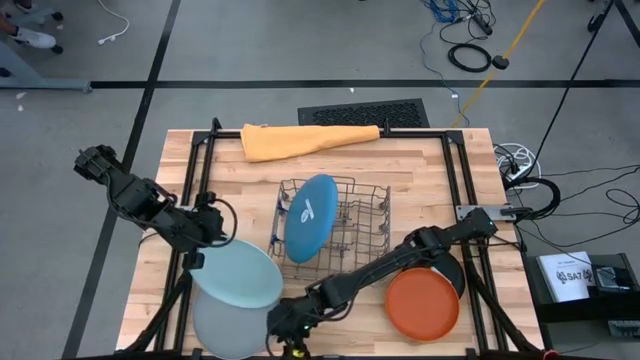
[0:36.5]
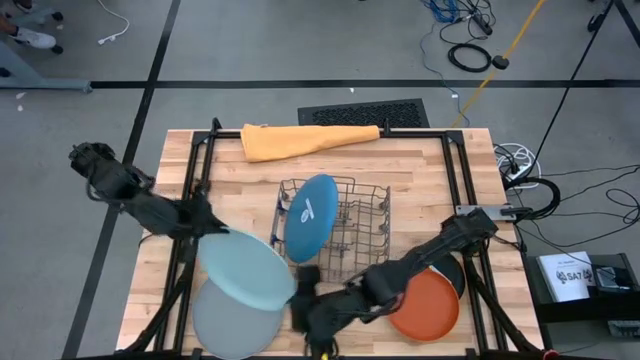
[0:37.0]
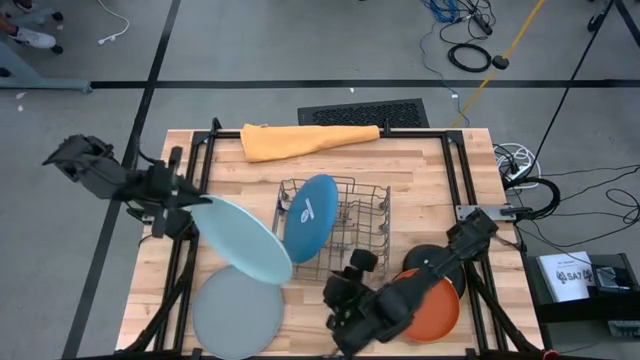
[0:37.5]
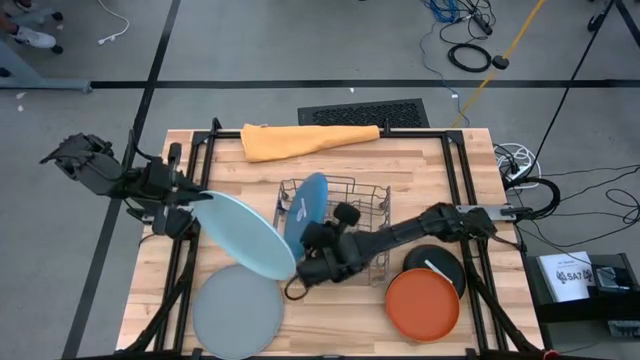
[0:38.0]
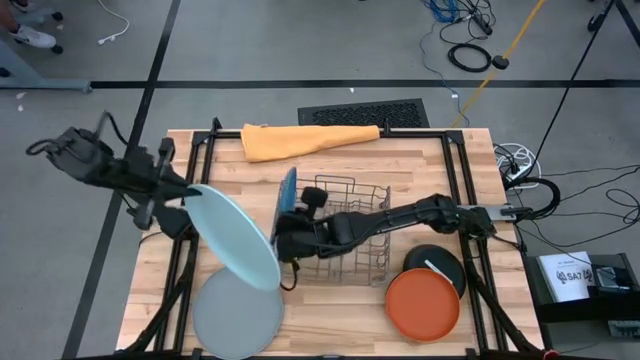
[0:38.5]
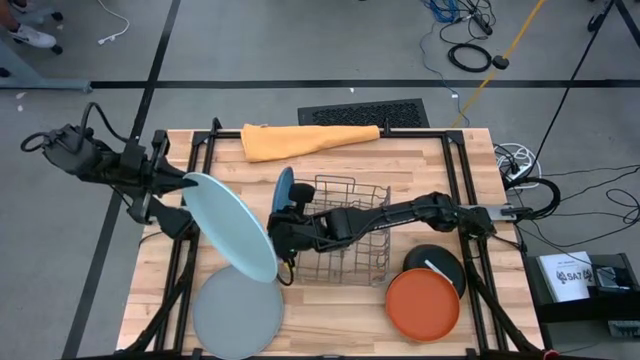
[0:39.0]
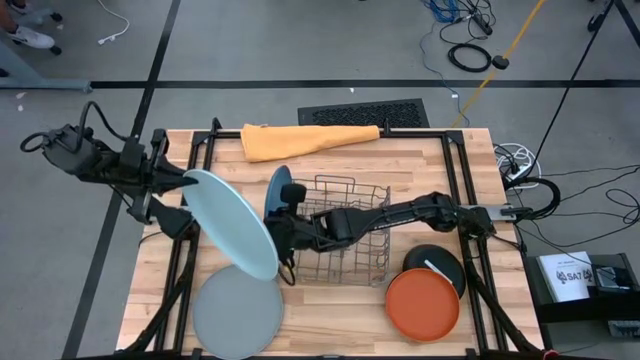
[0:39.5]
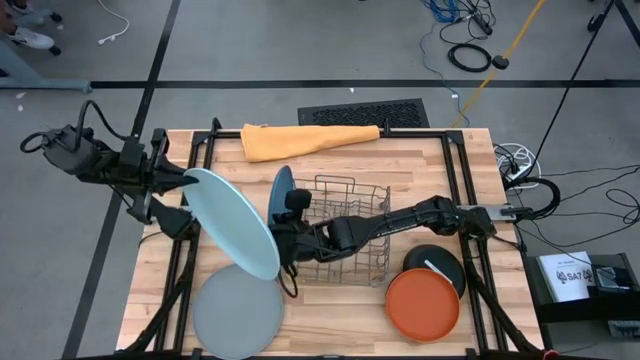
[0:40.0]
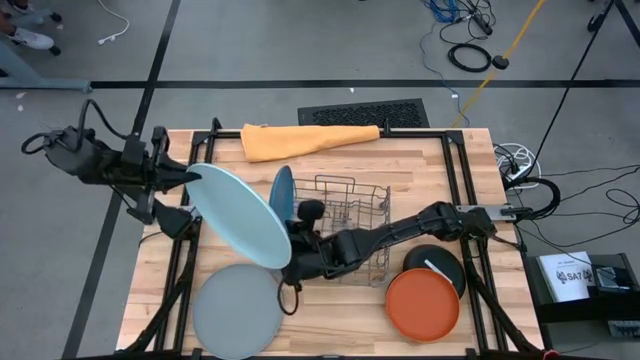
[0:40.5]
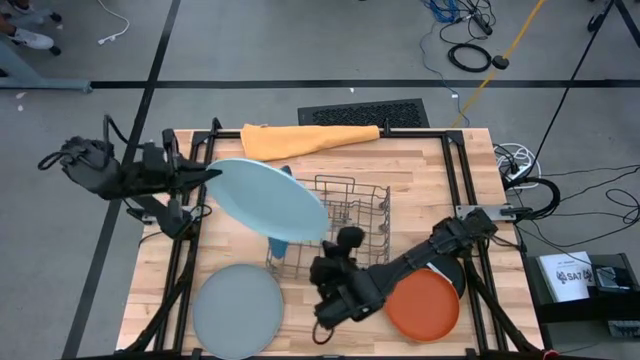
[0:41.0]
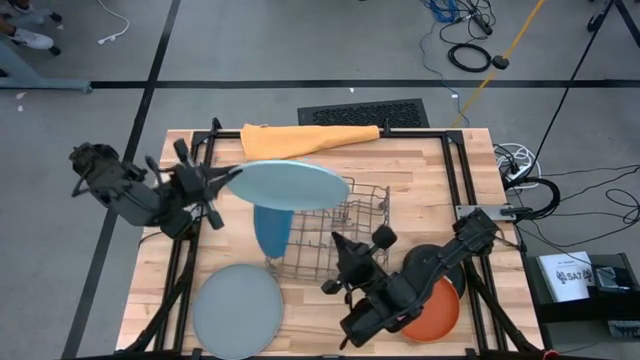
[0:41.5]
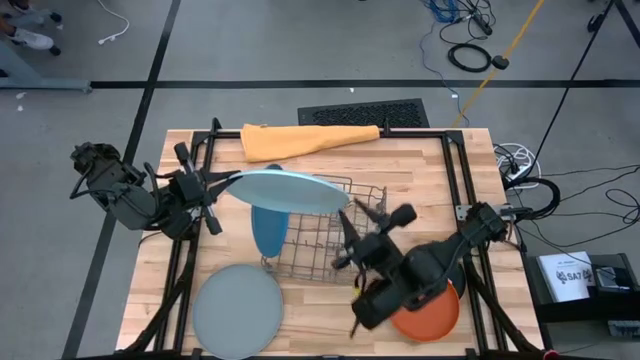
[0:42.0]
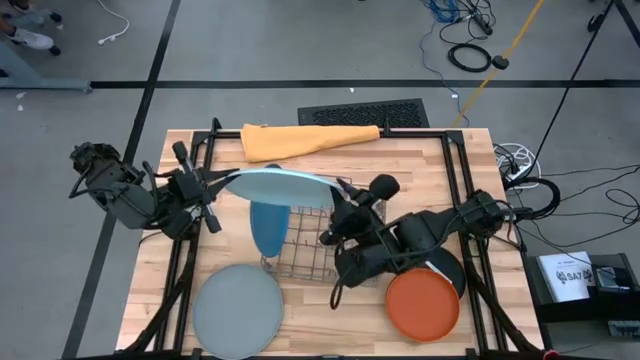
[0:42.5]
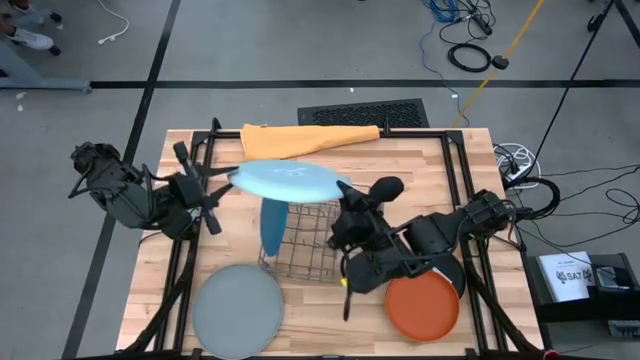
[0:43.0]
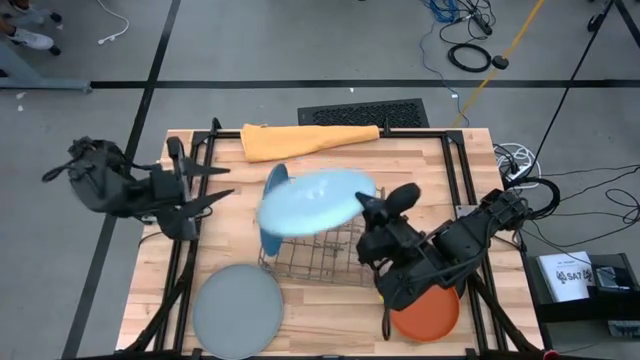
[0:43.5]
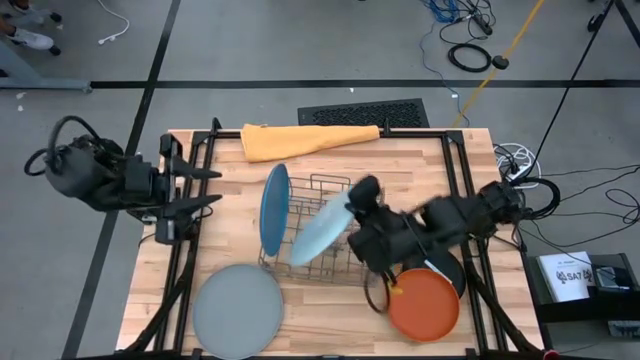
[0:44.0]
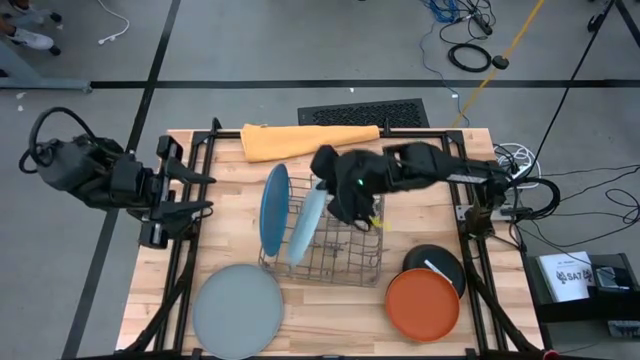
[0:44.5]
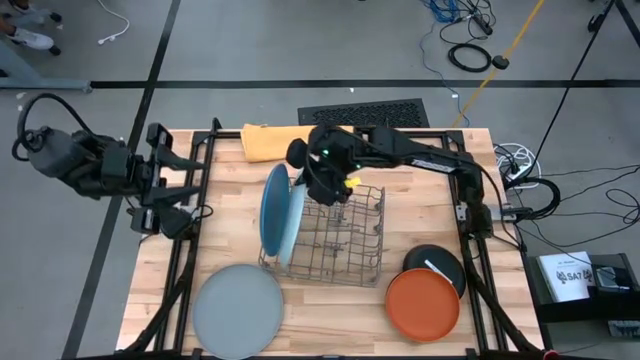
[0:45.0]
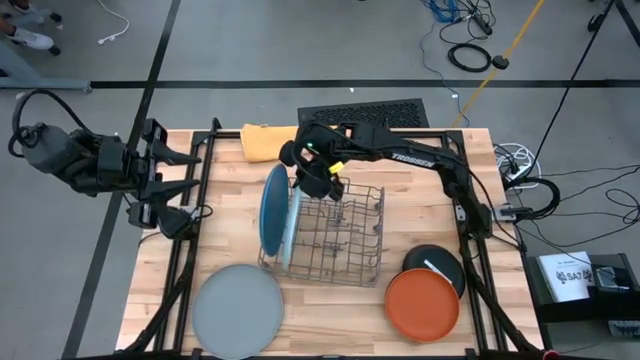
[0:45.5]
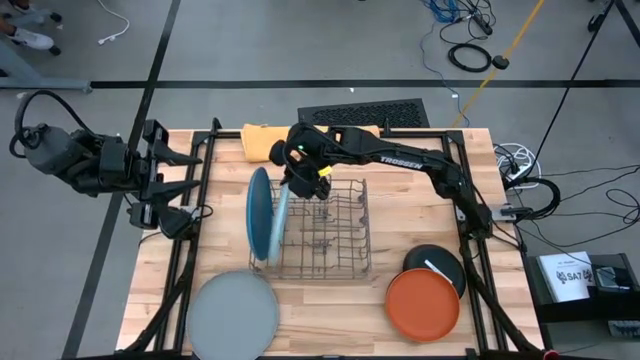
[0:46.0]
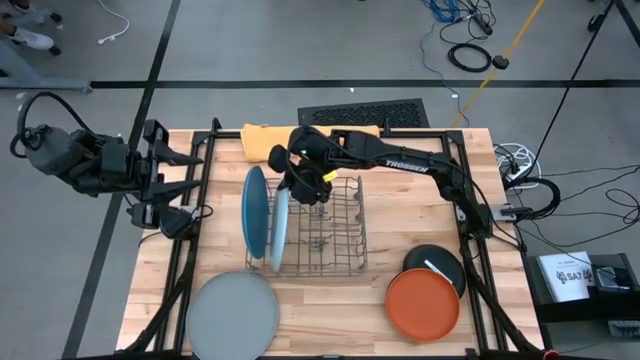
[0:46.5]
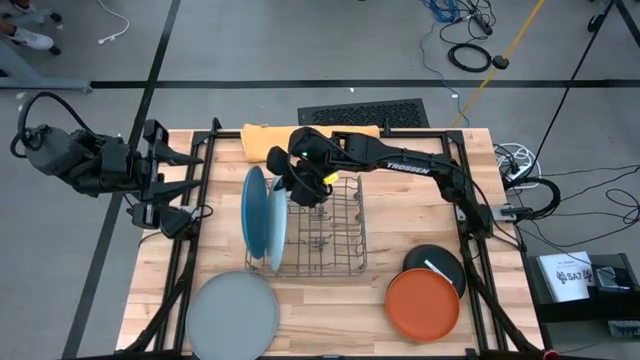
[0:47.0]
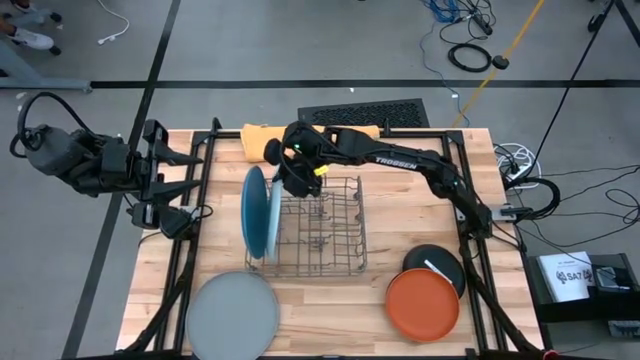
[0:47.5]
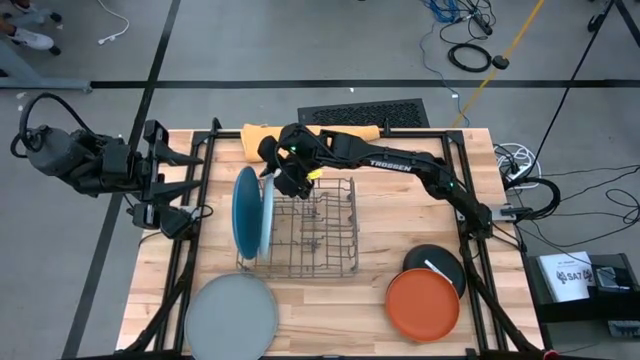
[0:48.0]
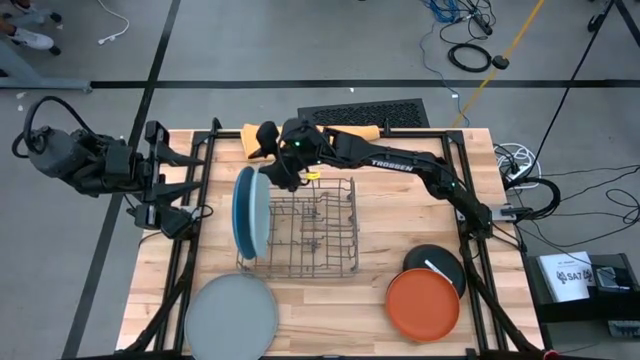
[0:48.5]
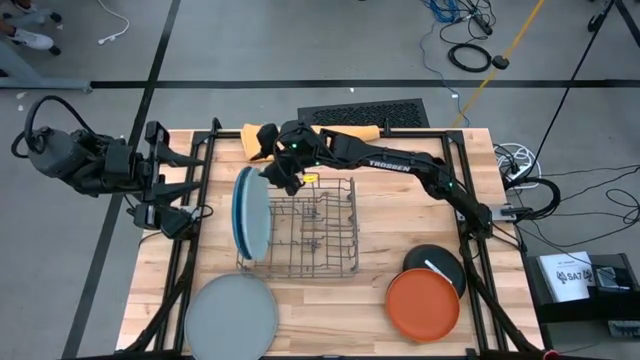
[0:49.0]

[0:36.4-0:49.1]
Task: Sort dishes
Put the light blue plate in the dish rack

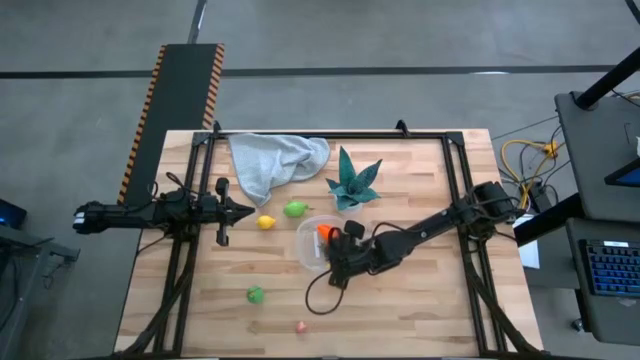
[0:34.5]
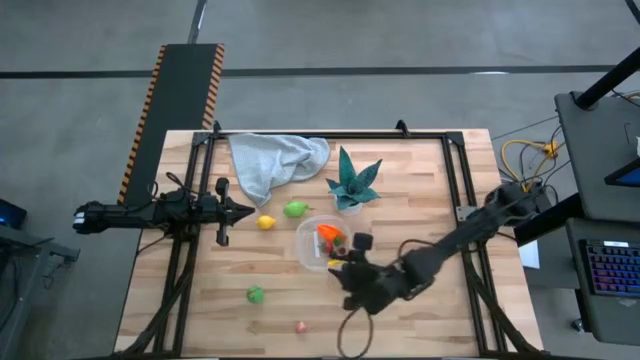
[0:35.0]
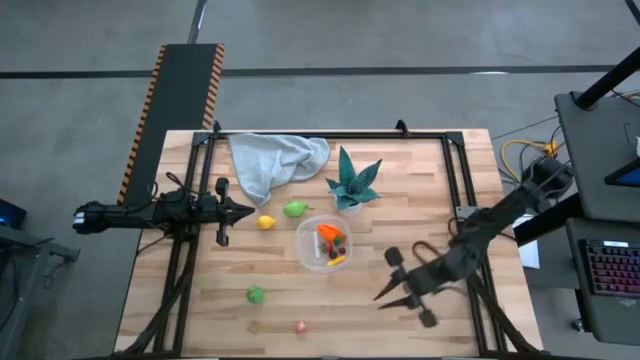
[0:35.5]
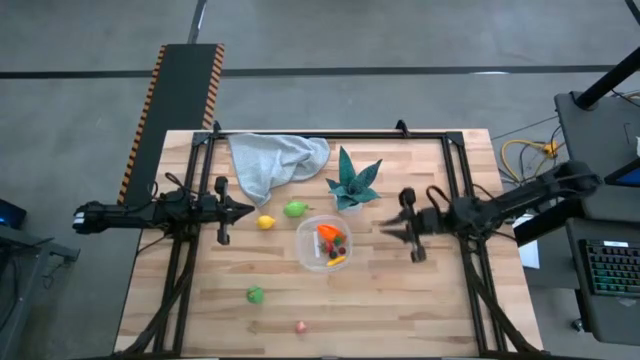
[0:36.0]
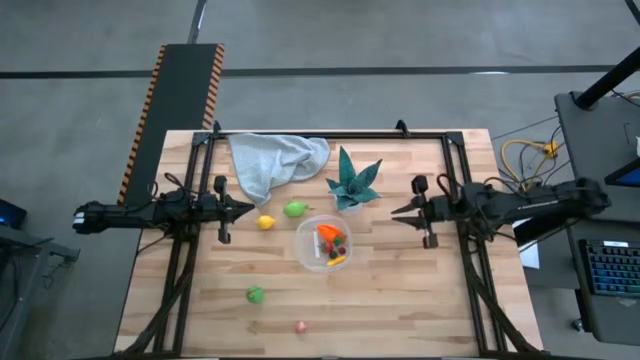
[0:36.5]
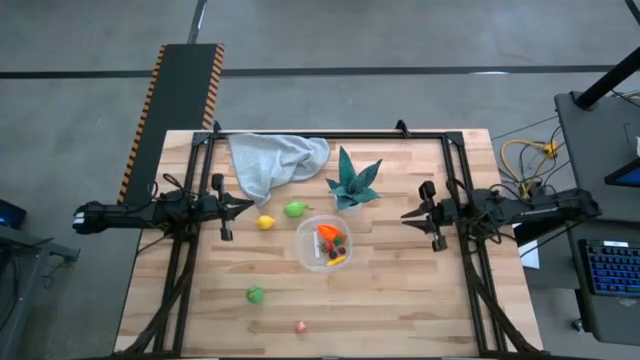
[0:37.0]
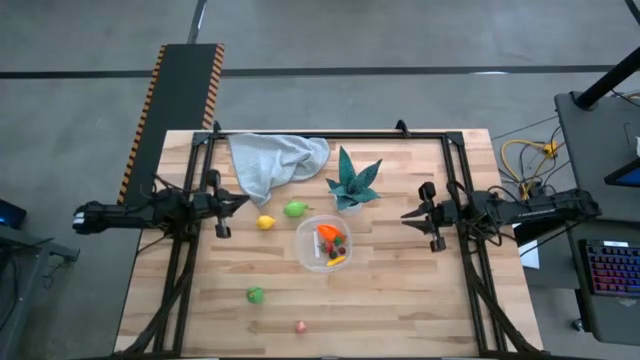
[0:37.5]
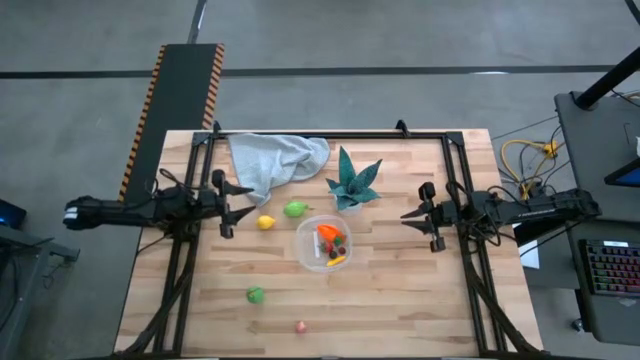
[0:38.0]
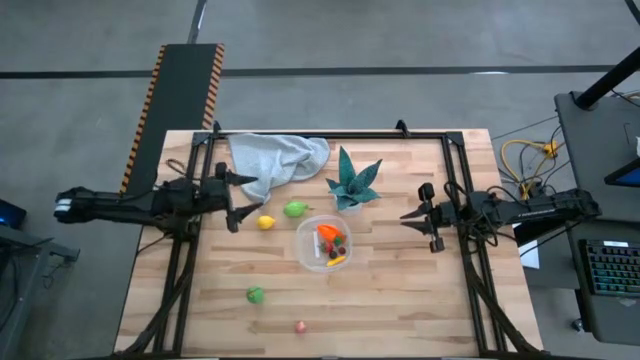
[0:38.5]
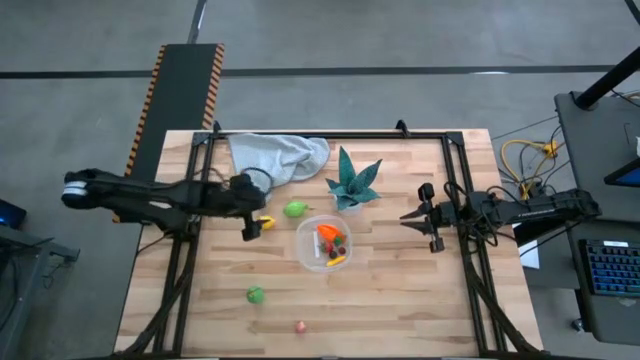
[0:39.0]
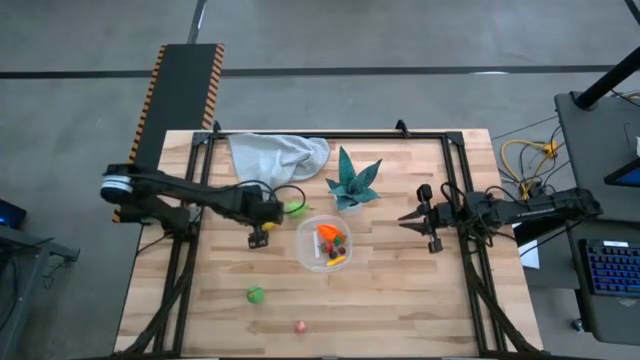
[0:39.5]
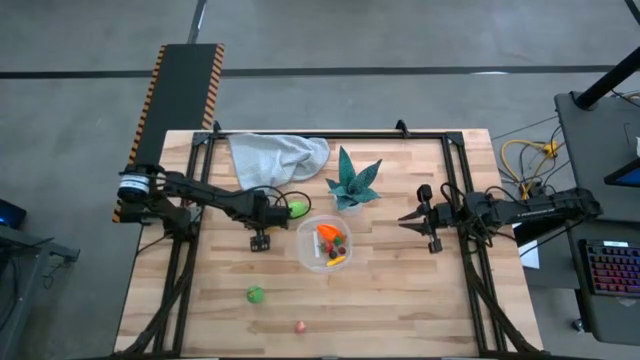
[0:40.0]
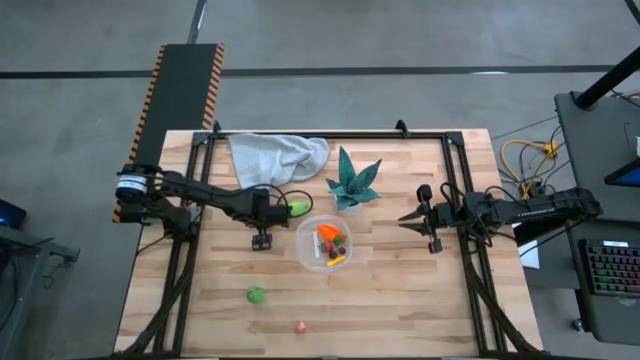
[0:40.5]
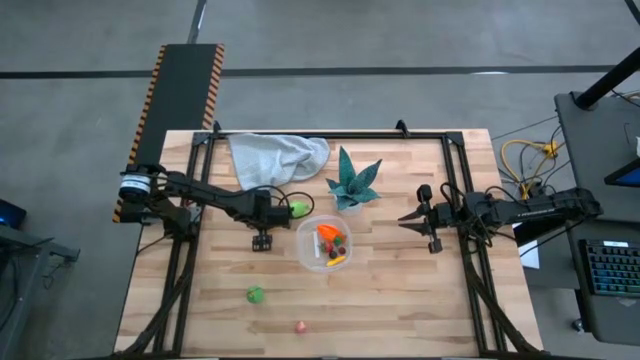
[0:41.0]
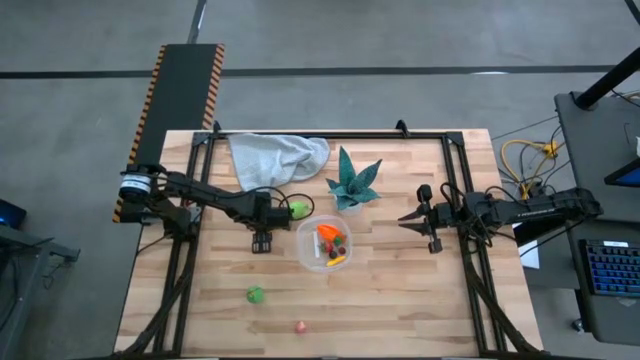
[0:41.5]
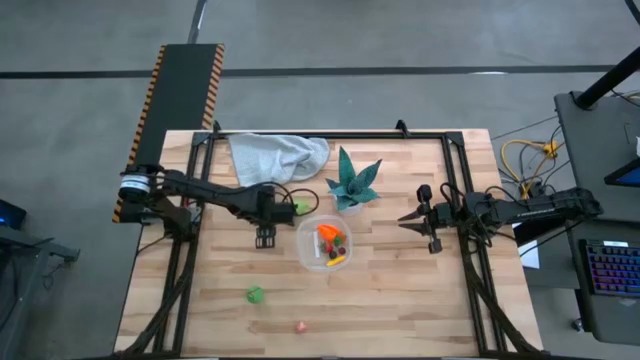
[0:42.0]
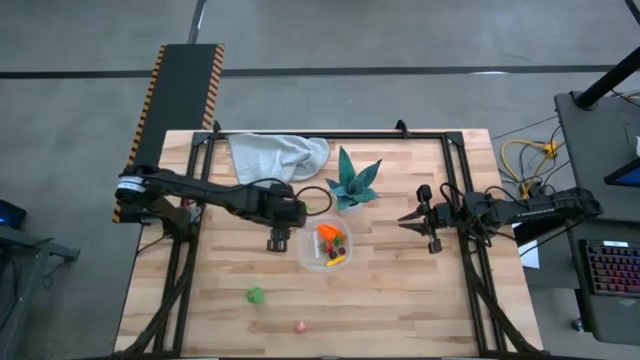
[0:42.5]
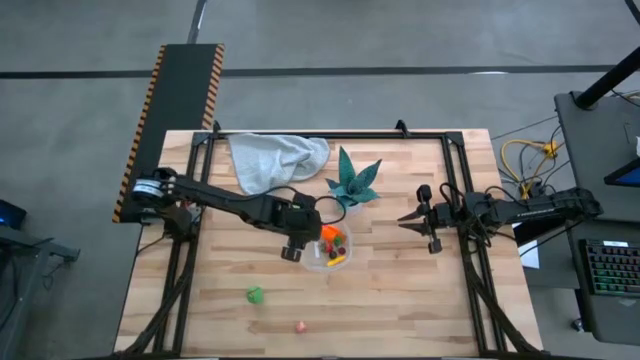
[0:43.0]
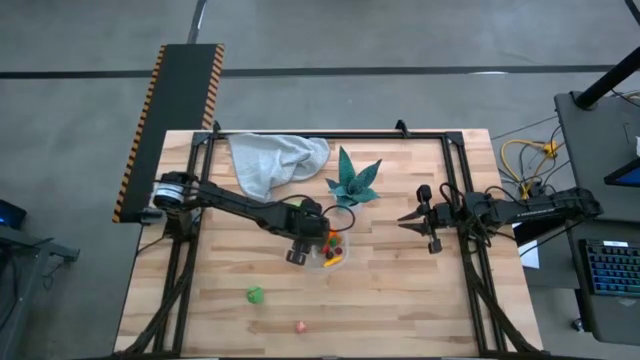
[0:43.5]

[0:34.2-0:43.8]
Task: Pick and placing Produce into tupperware
Put the yellow lemon into the transparent bin
